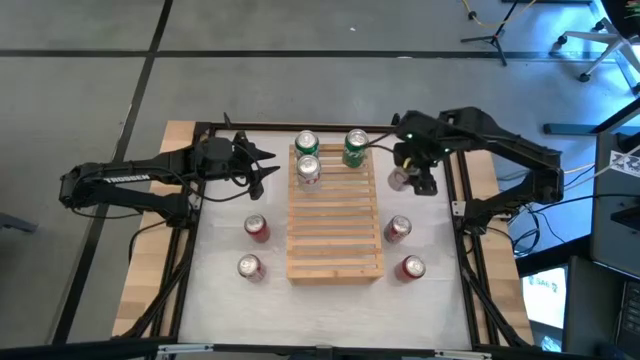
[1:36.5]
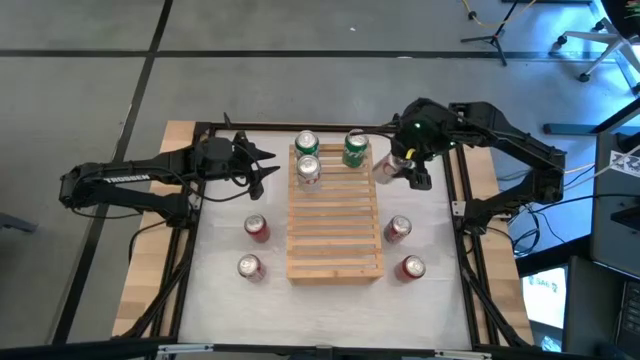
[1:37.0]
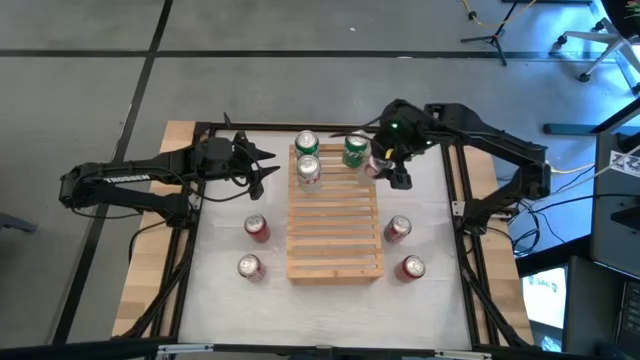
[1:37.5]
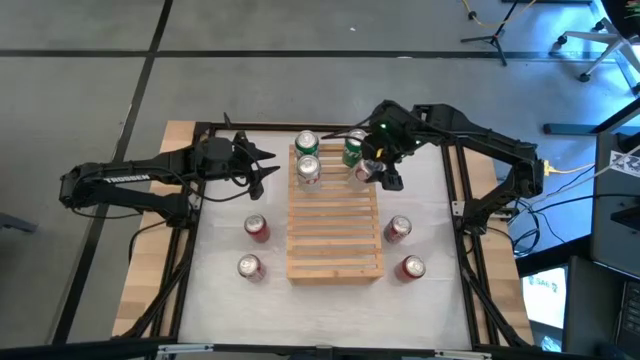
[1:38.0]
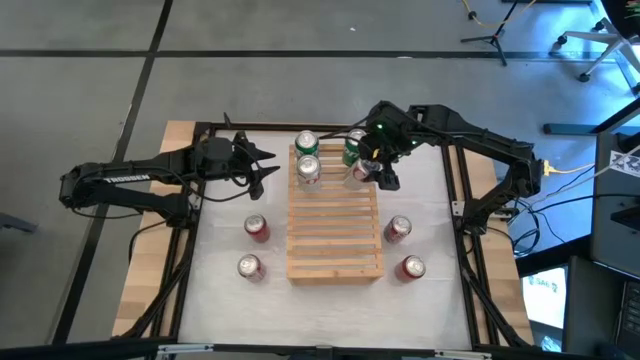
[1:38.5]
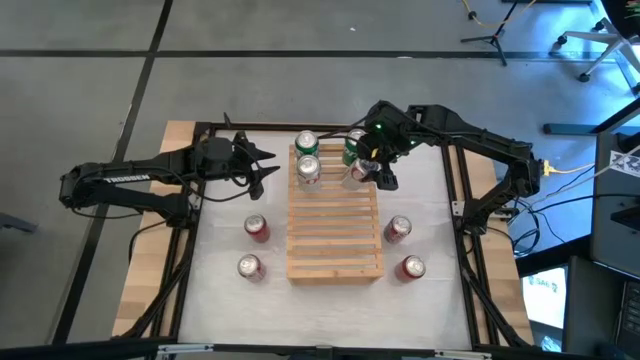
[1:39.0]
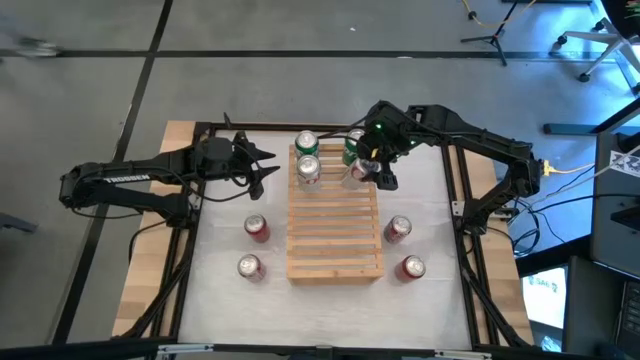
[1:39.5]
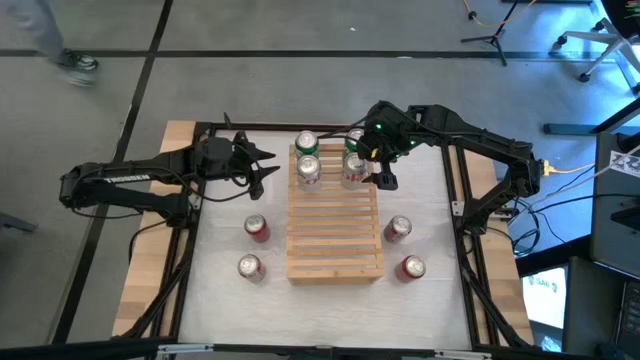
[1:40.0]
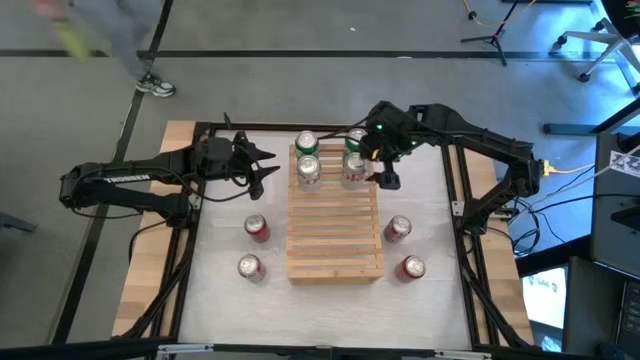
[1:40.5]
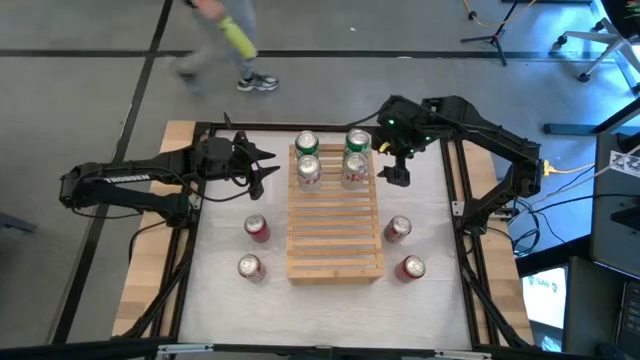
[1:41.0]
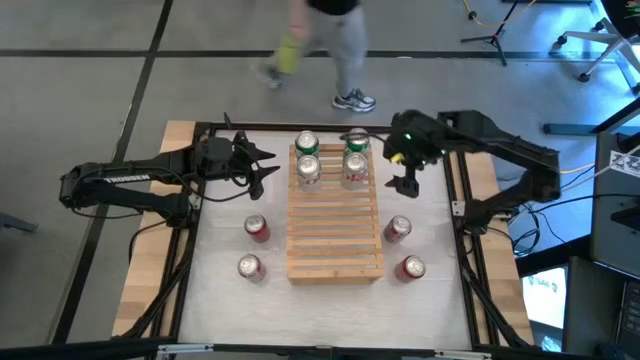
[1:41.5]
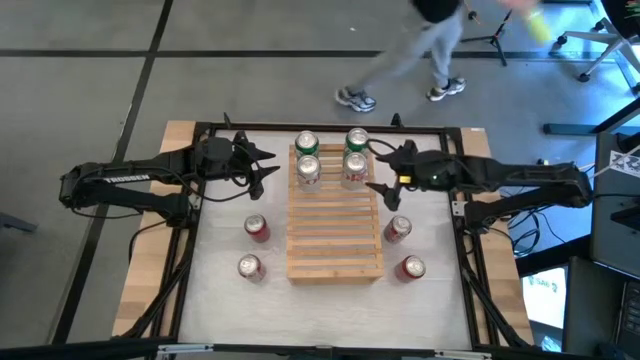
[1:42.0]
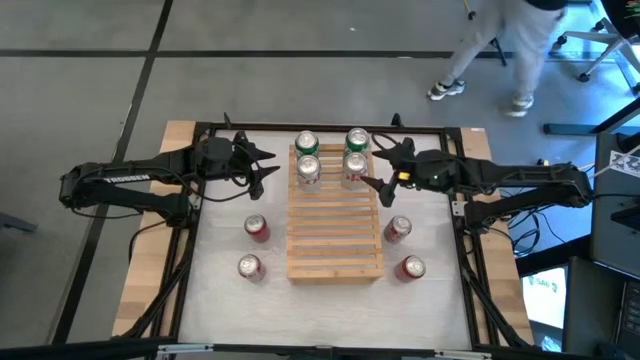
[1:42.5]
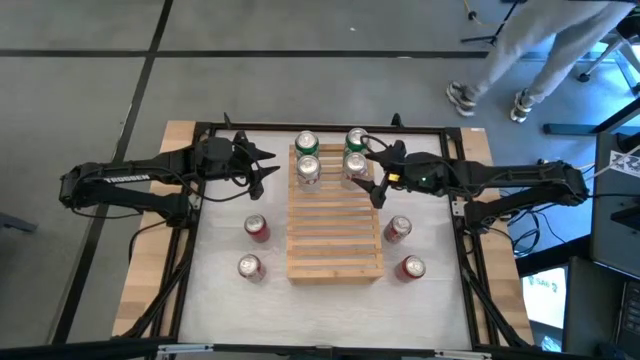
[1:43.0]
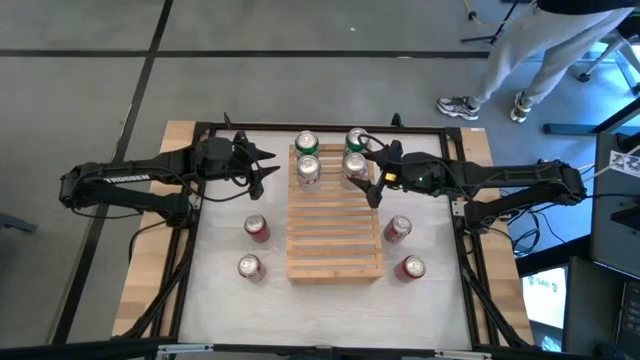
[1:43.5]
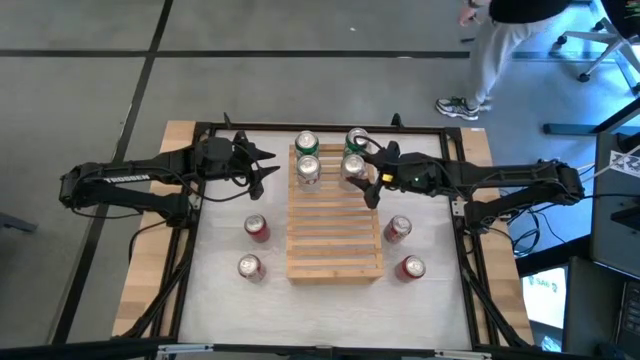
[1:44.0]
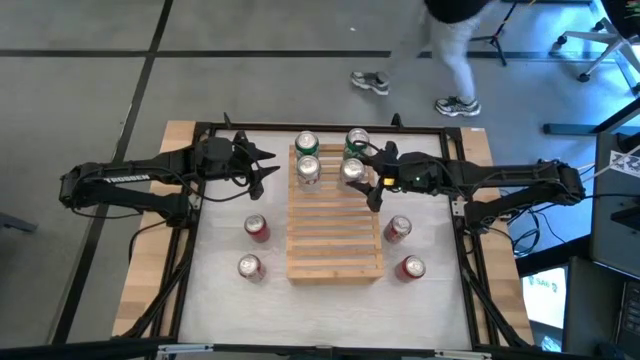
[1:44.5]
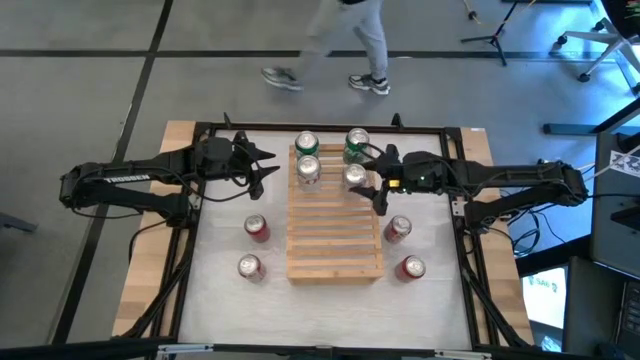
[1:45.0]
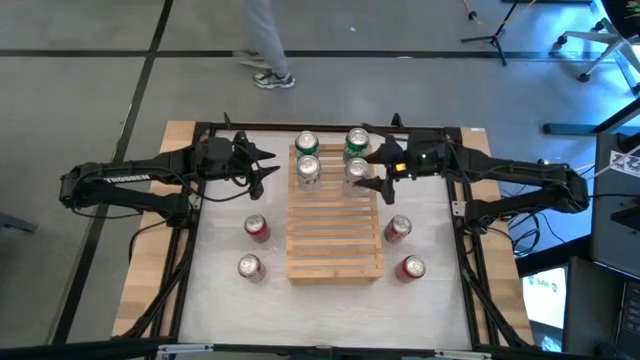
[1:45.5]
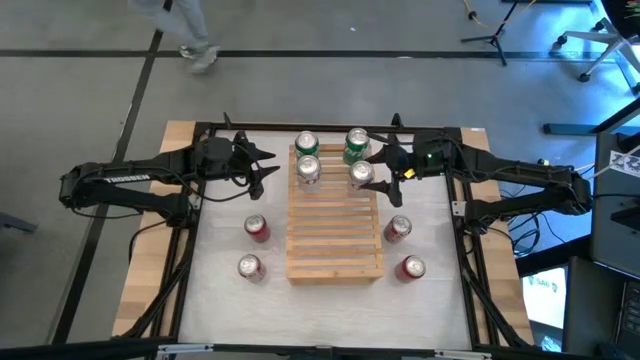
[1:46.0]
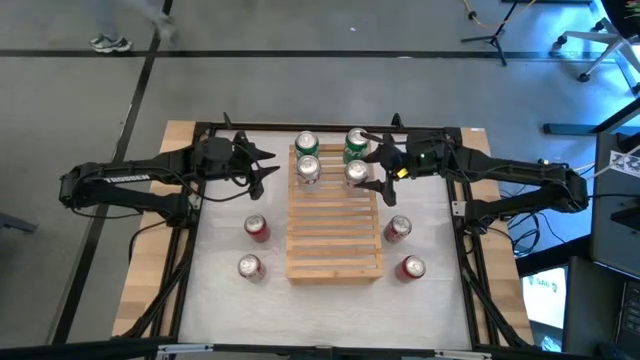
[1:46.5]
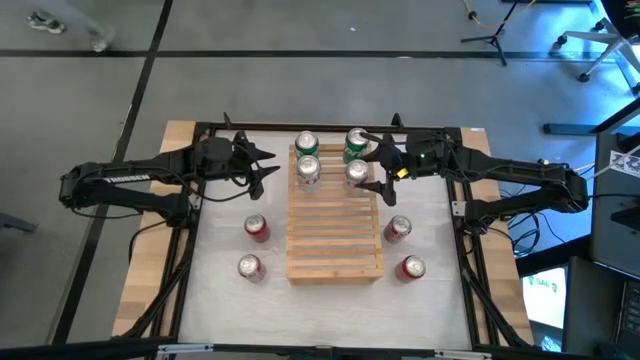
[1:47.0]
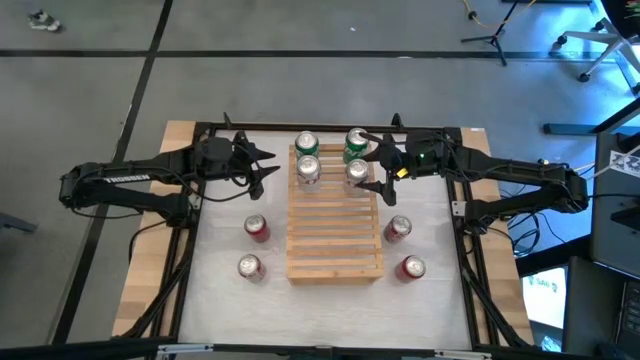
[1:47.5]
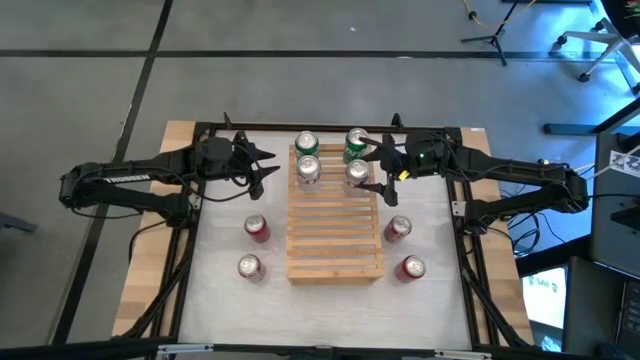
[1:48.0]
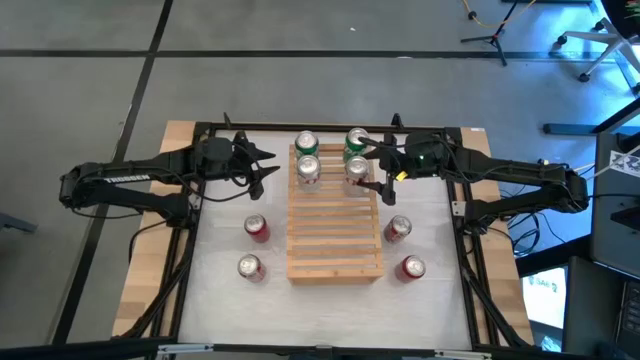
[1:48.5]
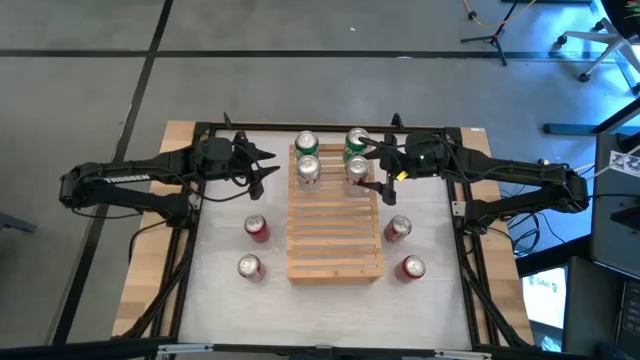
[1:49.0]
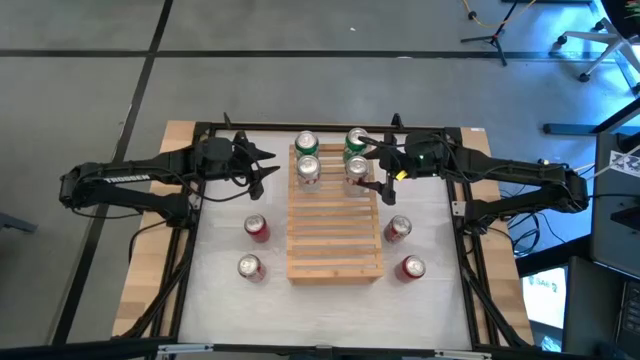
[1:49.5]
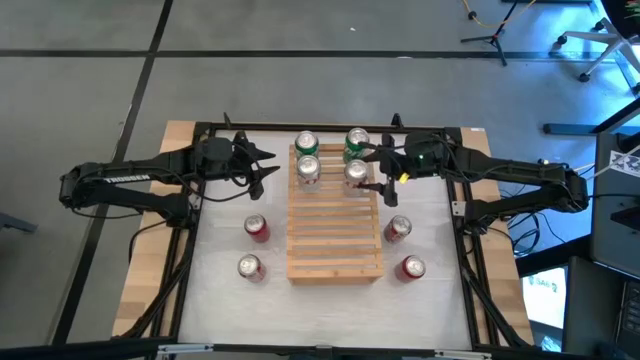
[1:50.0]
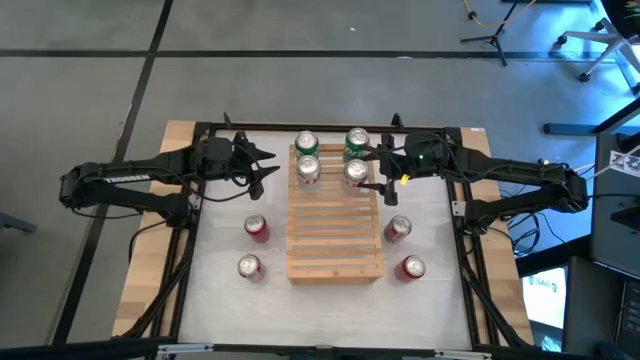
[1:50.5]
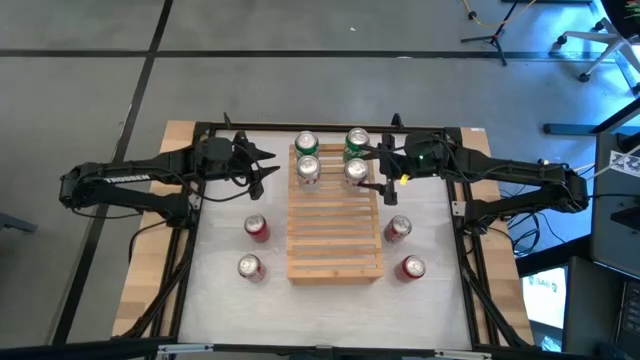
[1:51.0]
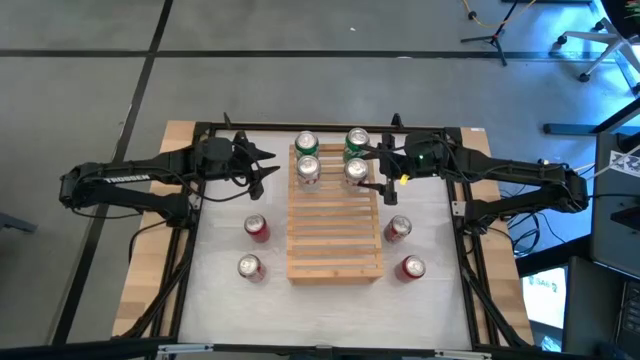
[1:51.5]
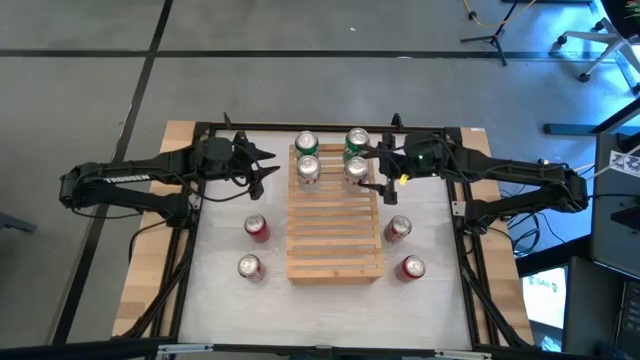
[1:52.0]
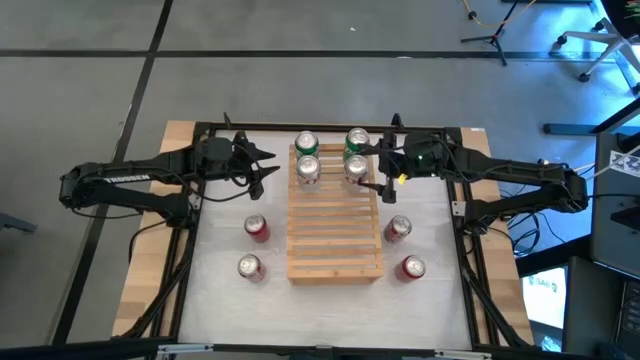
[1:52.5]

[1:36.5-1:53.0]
Task: Place canned beverage on shelf
Put the red and silver soda can on the shelf aligned with the red and silver soda can
